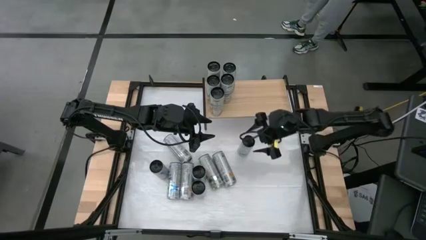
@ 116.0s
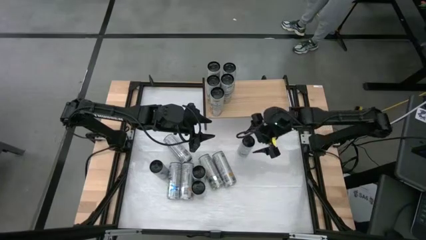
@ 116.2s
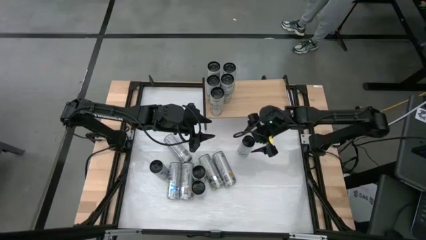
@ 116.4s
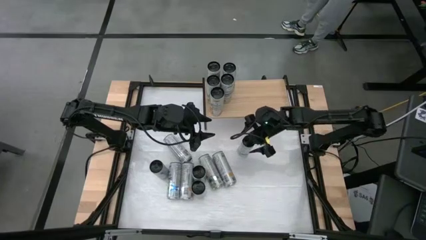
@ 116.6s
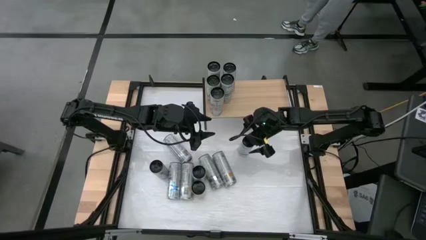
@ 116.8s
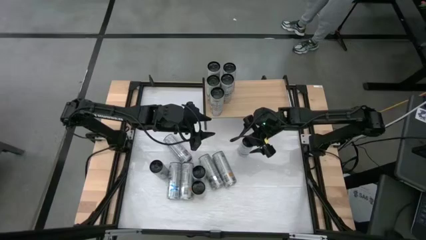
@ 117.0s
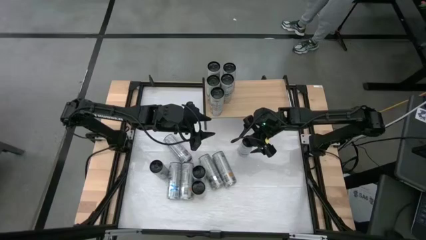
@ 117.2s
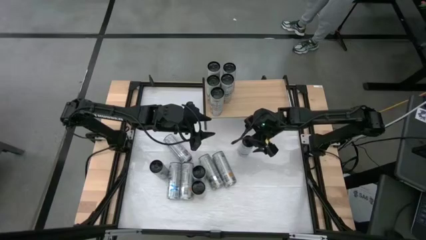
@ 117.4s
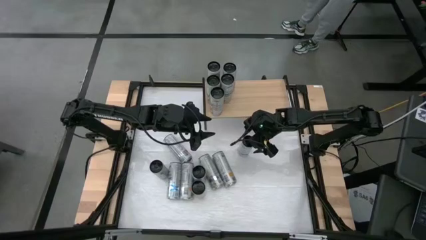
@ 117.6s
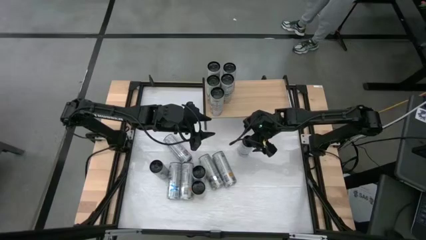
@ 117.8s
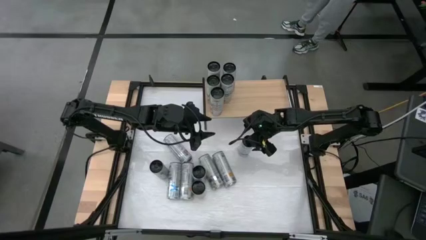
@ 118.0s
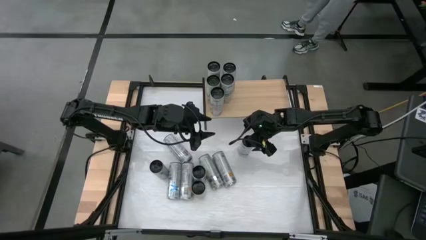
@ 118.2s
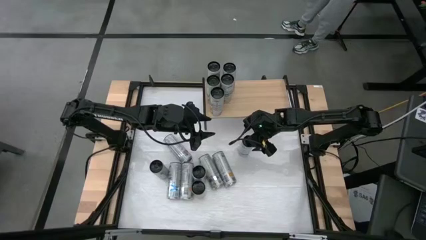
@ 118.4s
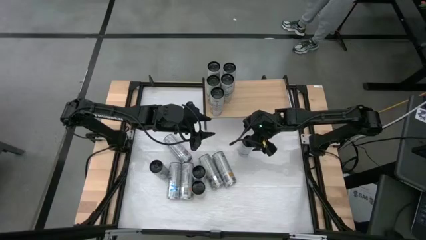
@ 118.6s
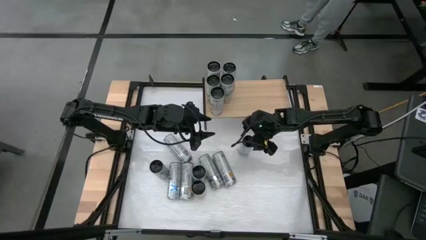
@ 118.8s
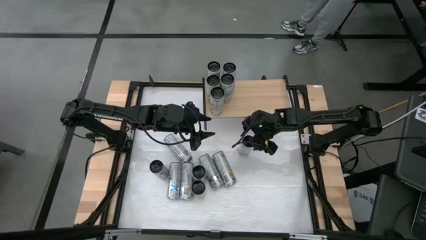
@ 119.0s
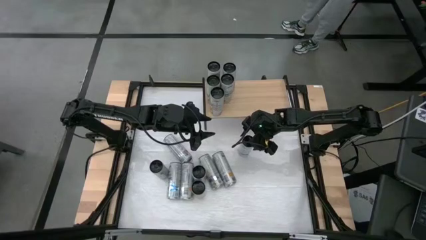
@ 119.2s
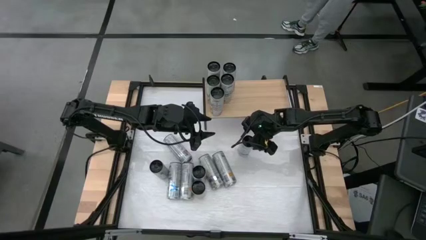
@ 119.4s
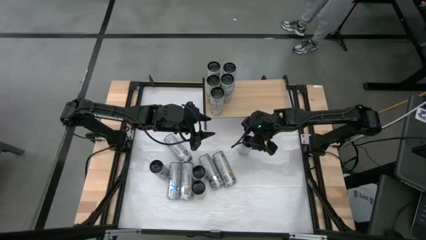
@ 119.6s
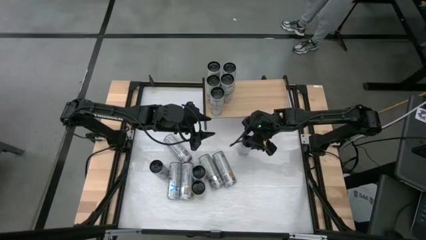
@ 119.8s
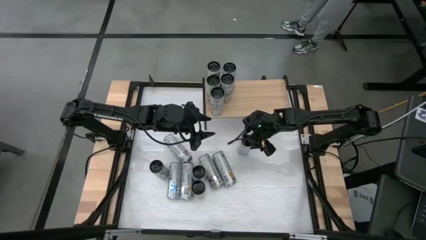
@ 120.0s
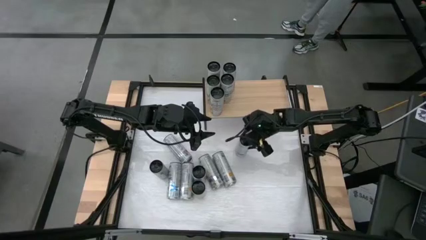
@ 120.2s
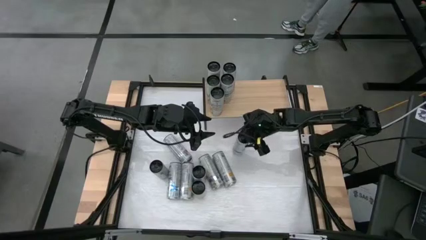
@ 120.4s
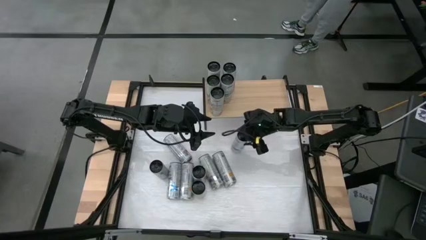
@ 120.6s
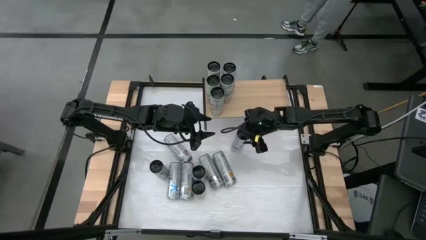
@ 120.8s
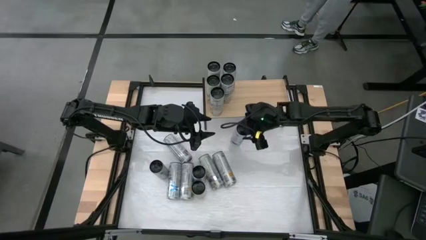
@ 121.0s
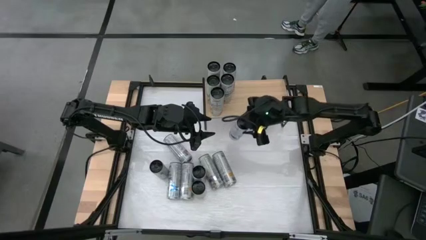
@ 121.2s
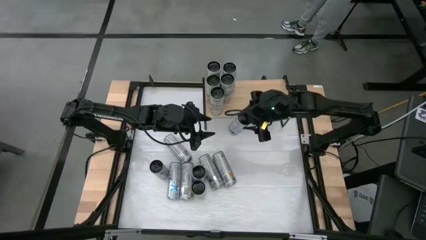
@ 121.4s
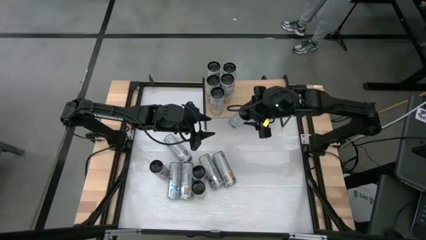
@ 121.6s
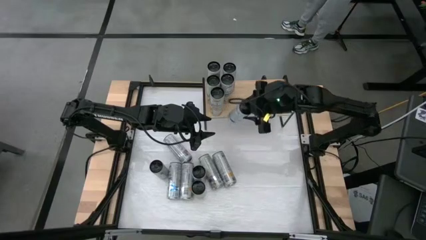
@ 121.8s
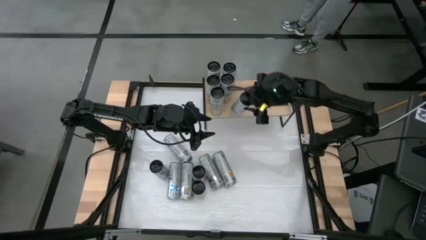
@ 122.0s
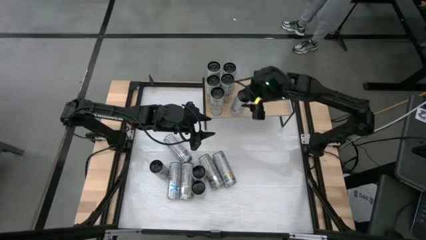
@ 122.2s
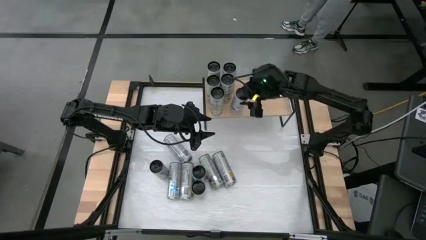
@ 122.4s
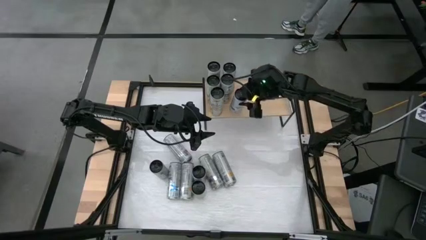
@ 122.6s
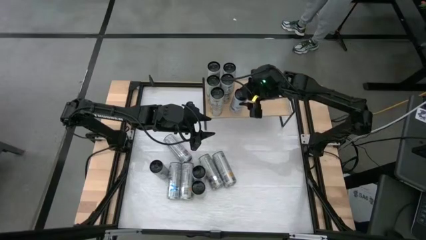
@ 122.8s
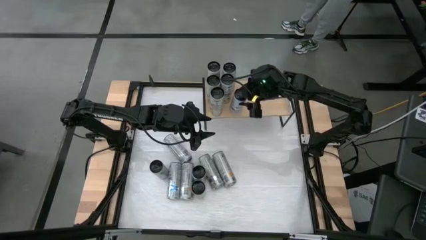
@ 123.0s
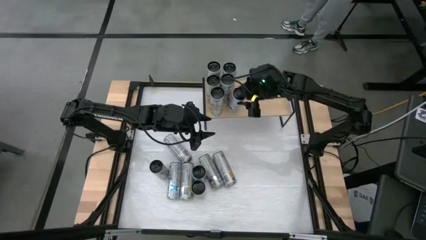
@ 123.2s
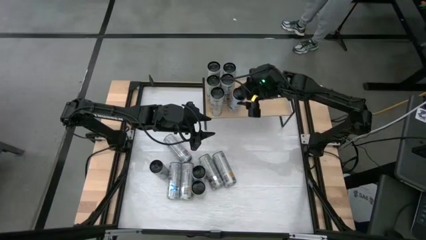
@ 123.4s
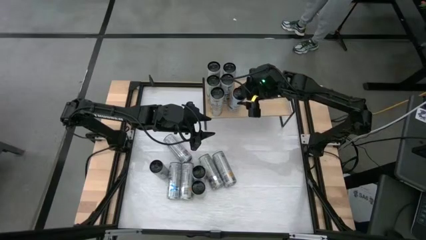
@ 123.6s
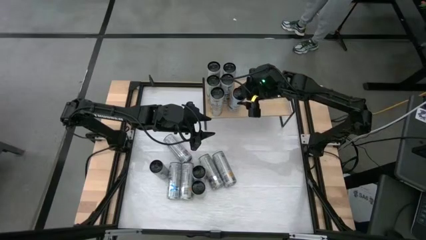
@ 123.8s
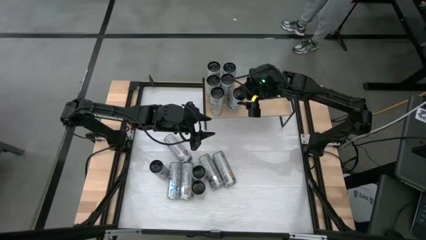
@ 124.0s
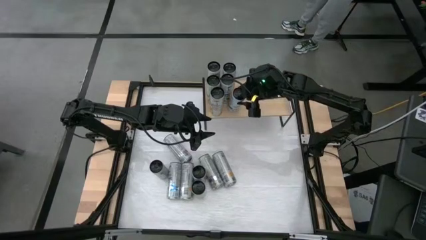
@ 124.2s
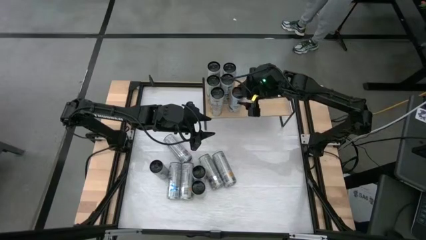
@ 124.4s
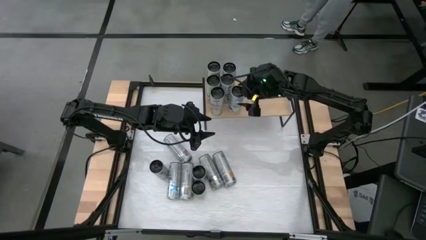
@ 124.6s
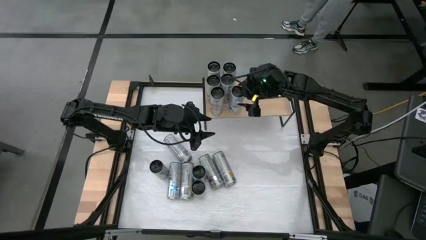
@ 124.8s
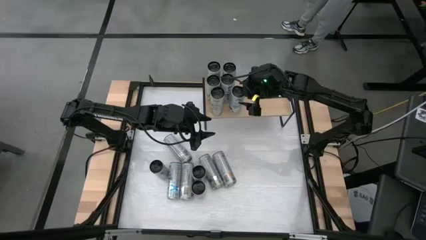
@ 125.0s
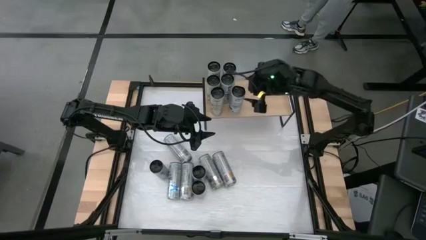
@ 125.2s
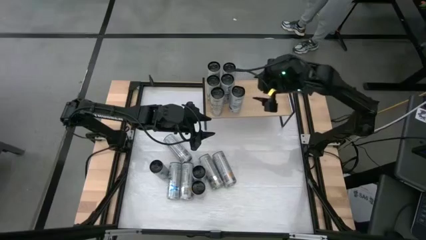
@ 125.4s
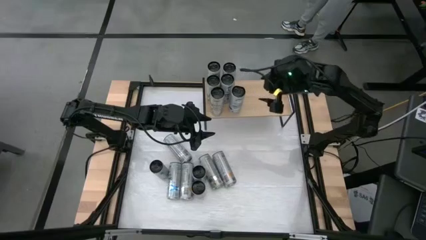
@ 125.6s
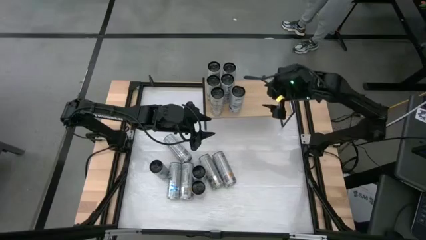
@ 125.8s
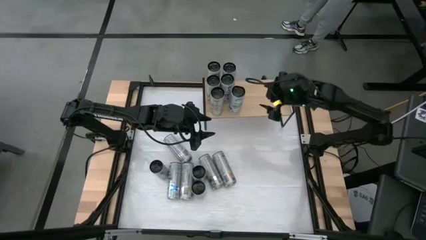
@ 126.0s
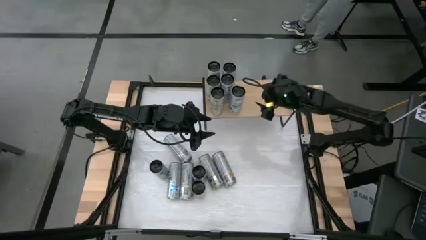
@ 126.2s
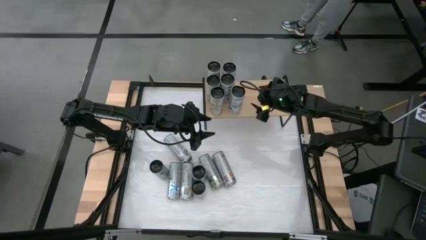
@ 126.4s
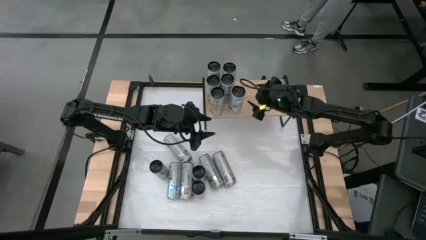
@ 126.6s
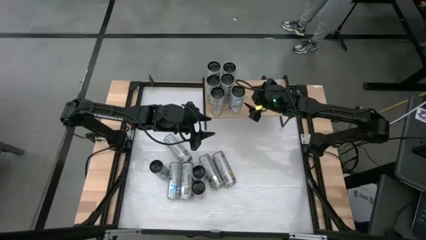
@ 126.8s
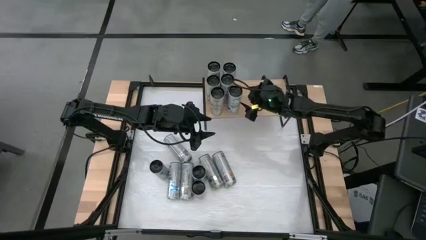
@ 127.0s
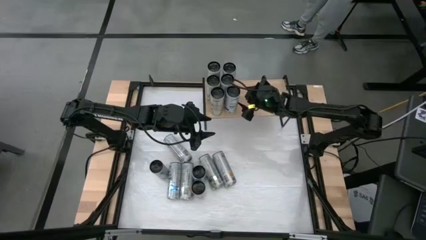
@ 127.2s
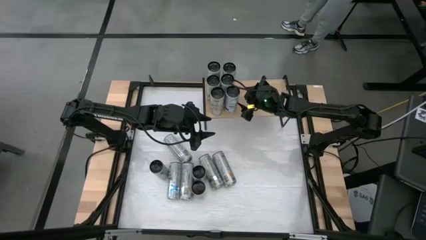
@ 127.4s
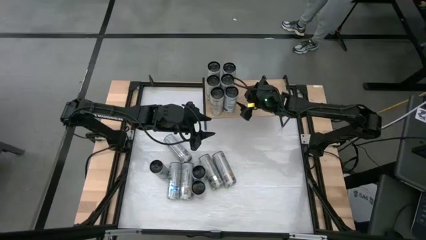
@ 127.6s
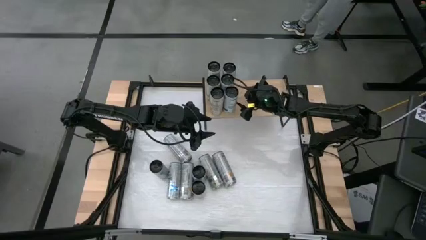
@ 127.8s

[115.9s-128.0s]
Task: Place canned beverage on shelf
Put the left blue soda can on the shelf aligned with the other blue soda cans

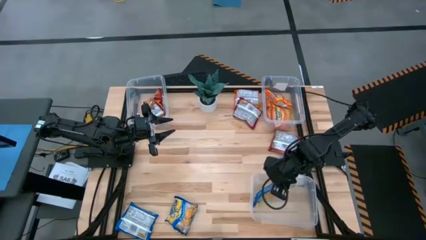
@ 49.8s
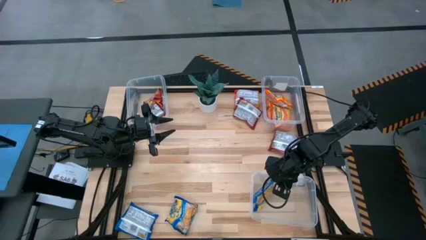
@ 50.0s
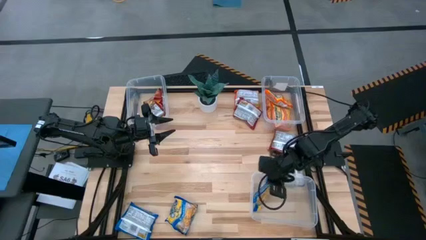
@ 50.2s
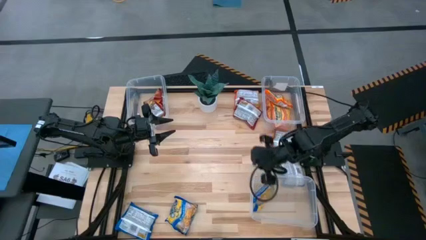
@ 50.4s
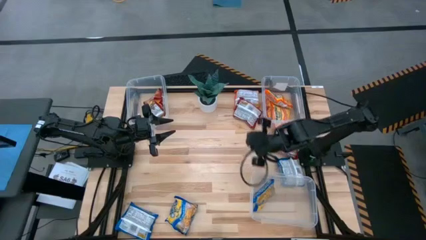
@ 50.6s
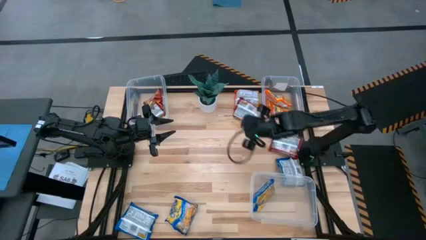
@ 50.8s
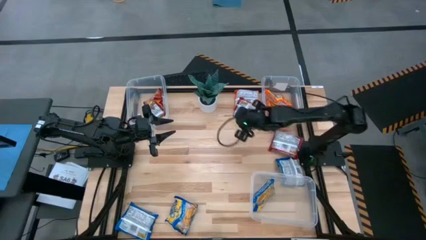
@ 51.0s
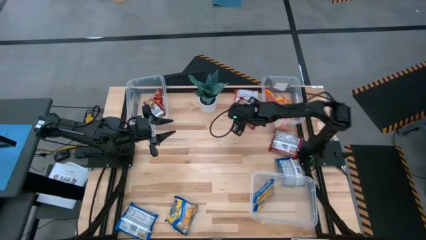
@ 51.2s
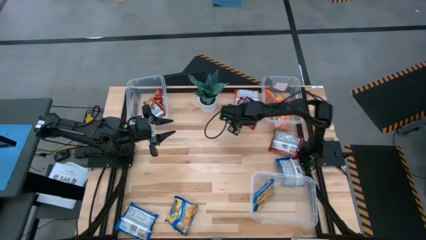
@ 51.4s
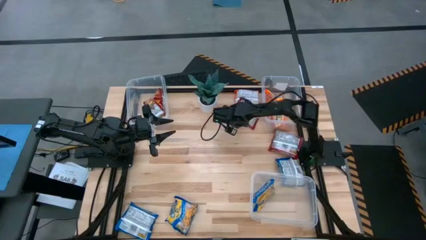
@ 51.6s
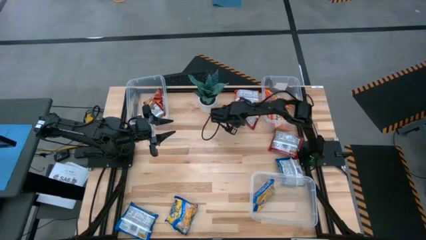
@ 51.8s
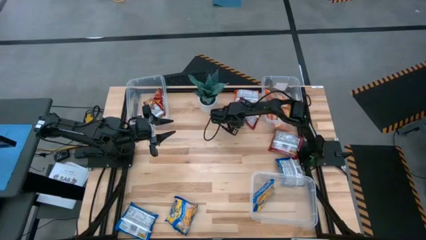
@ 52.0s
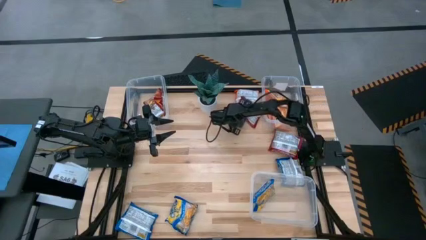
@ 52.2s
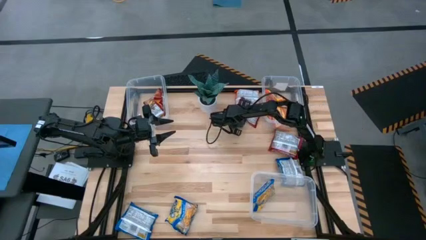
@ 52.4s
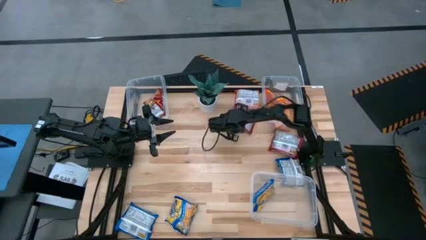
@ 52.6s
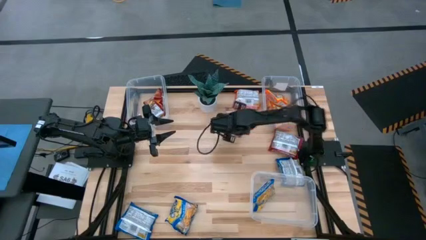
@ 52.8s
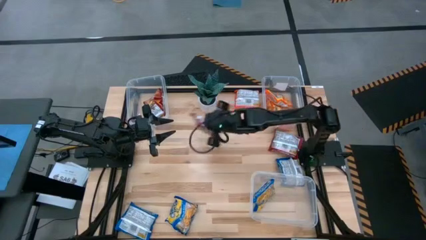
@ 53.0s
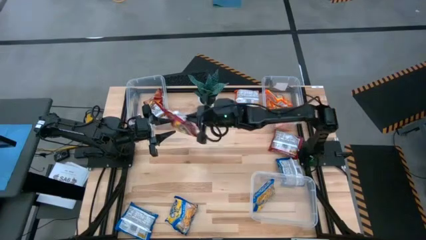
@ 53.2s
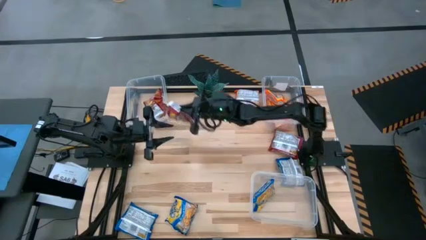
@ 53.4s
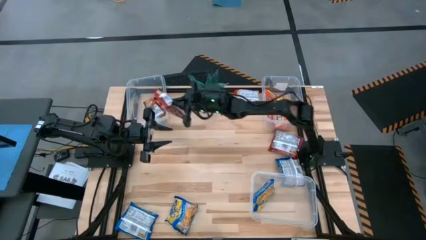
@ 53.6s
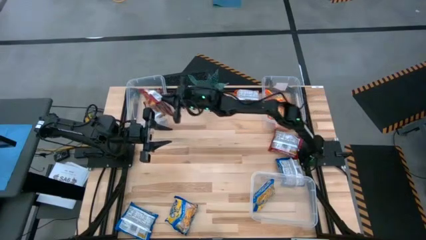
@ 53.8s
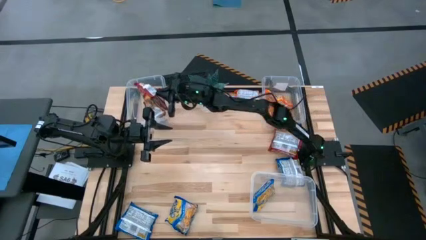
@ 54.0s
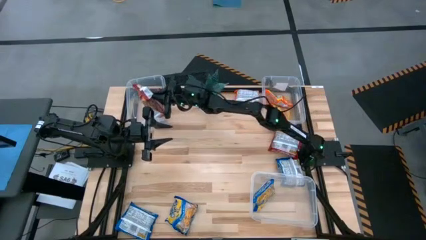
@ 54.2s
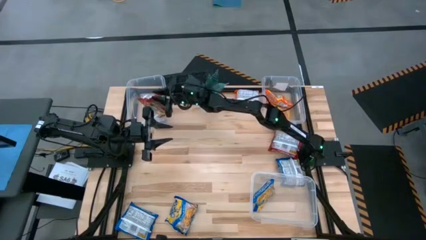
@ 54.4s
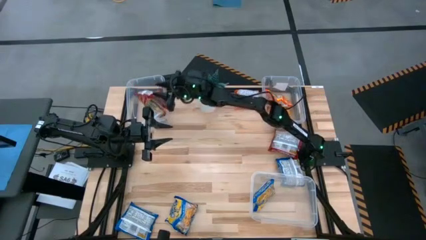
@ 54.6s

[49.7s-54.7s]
Task: Sort Maruchan noodles
Put the red noodle pack in the top left transparent bin
